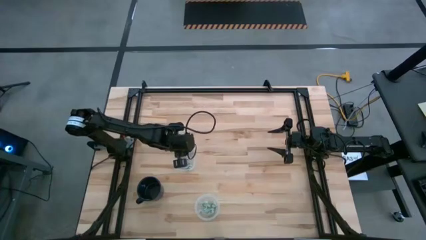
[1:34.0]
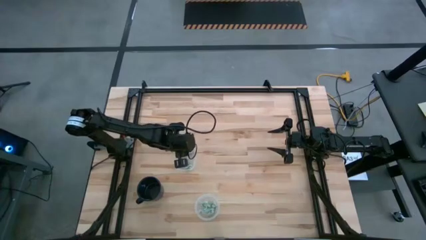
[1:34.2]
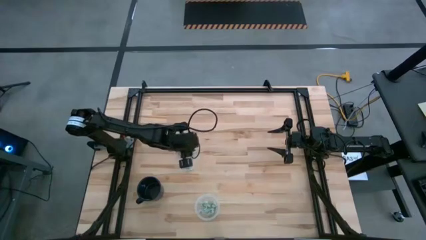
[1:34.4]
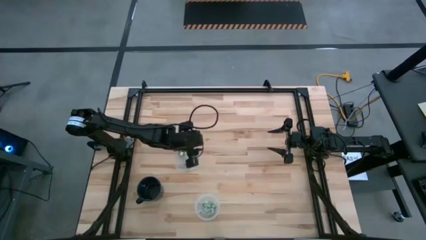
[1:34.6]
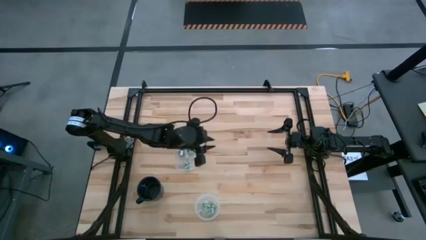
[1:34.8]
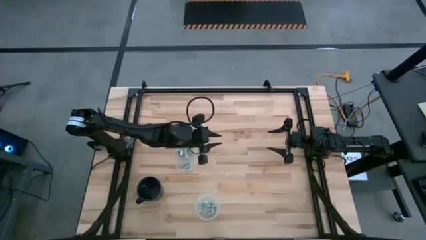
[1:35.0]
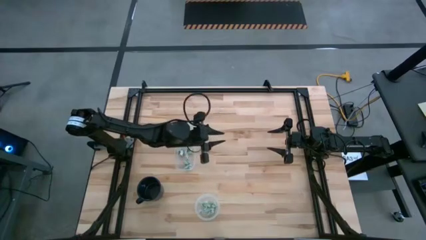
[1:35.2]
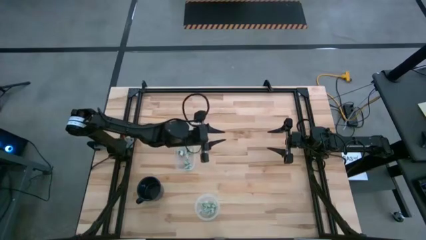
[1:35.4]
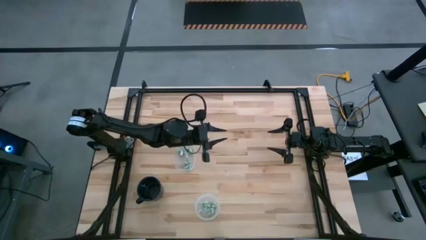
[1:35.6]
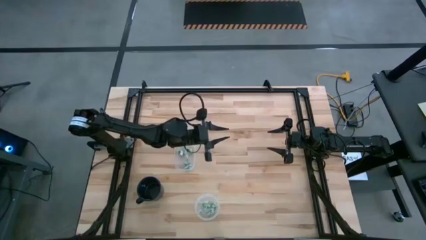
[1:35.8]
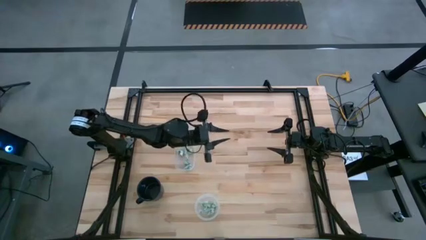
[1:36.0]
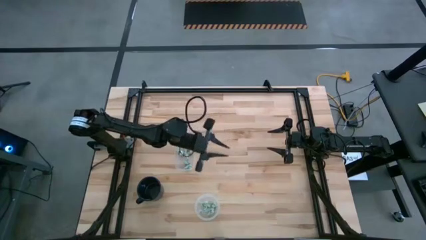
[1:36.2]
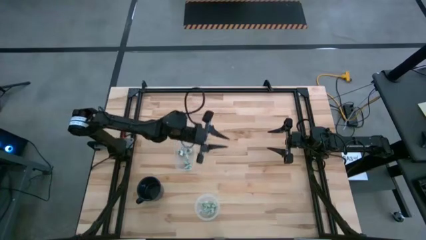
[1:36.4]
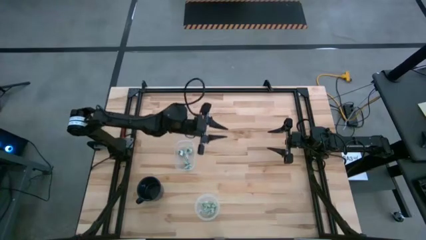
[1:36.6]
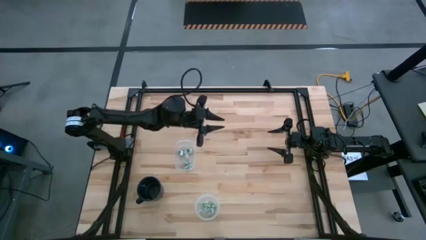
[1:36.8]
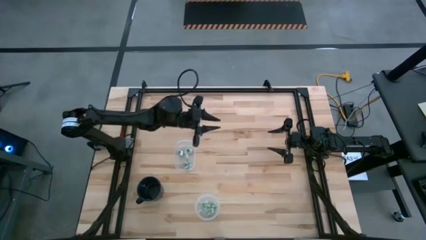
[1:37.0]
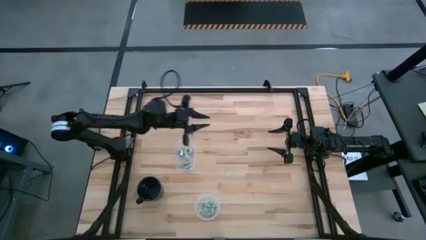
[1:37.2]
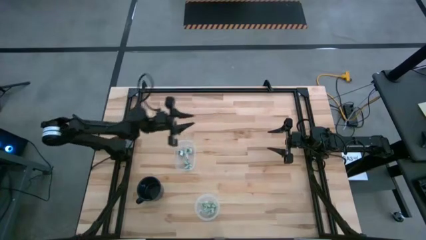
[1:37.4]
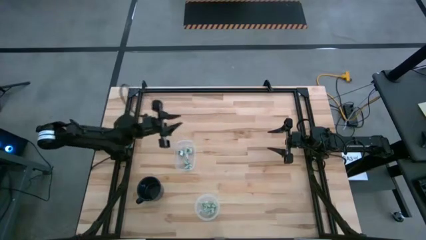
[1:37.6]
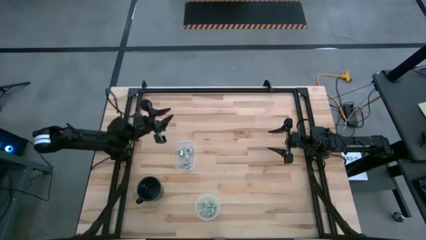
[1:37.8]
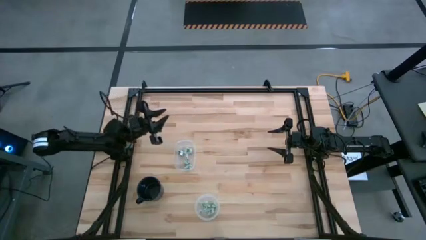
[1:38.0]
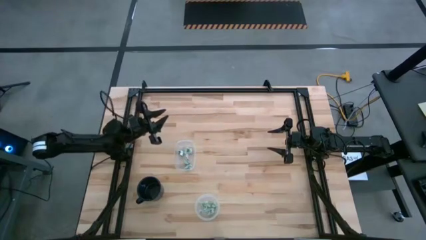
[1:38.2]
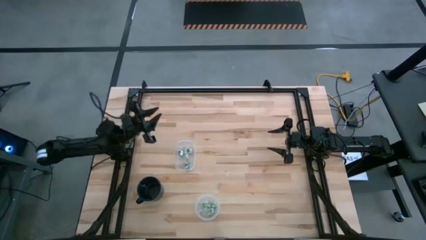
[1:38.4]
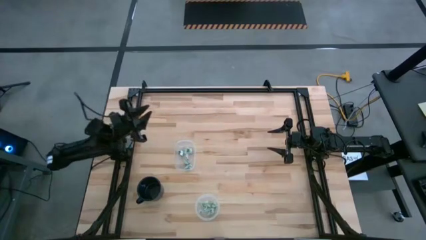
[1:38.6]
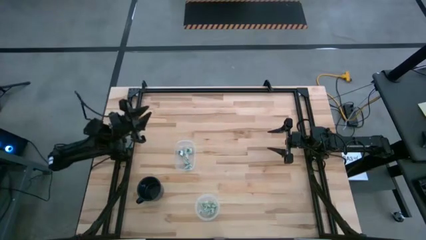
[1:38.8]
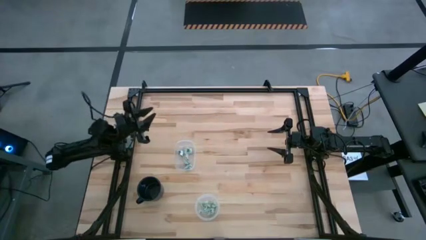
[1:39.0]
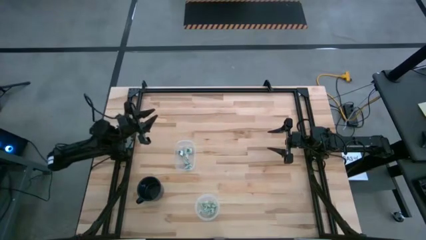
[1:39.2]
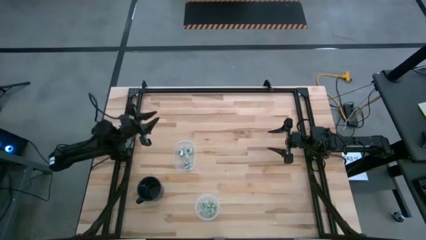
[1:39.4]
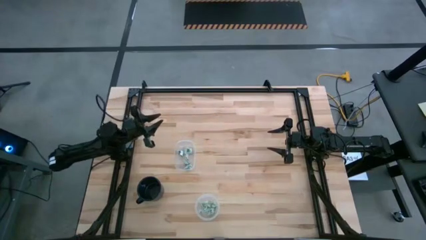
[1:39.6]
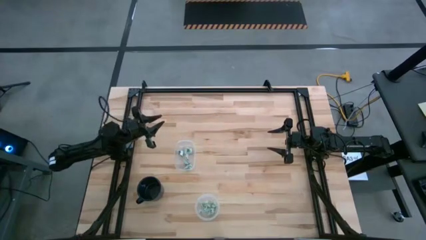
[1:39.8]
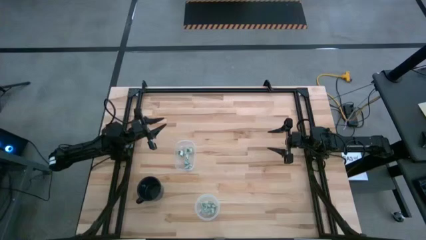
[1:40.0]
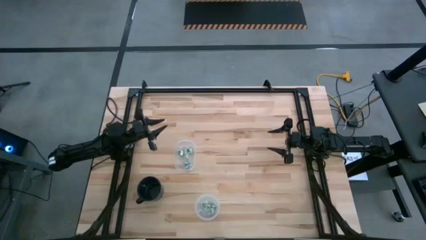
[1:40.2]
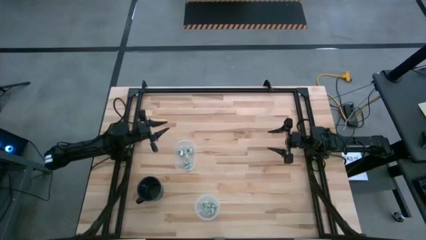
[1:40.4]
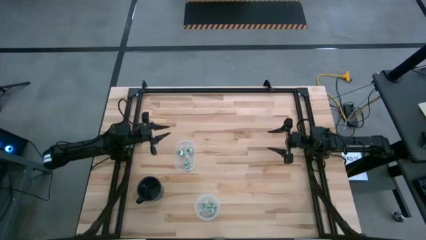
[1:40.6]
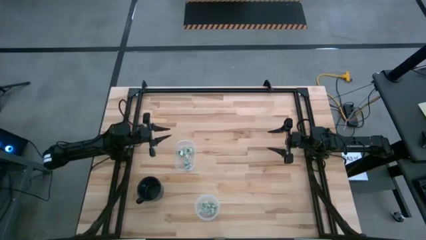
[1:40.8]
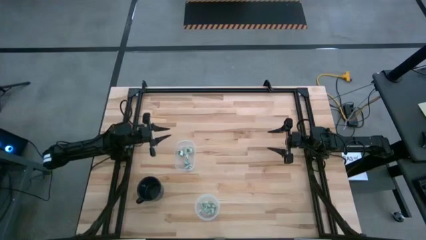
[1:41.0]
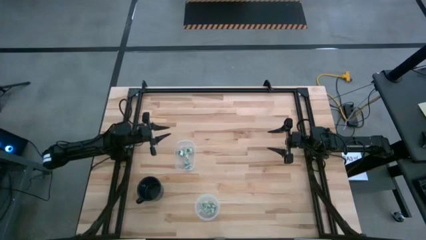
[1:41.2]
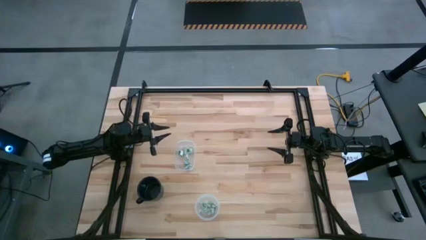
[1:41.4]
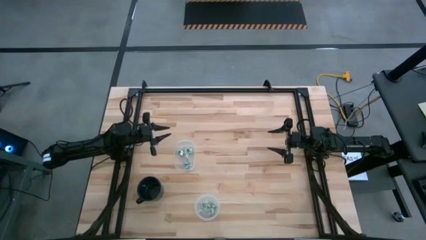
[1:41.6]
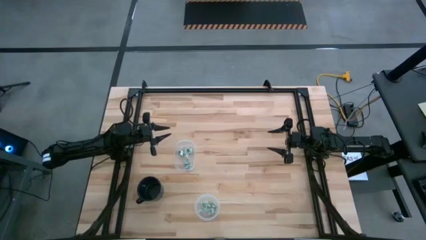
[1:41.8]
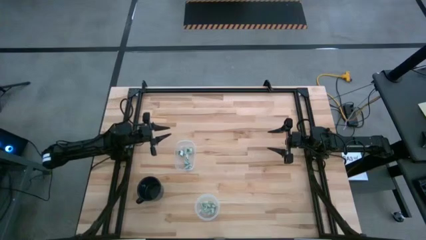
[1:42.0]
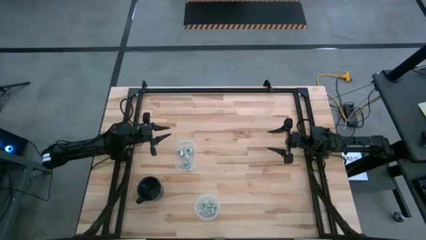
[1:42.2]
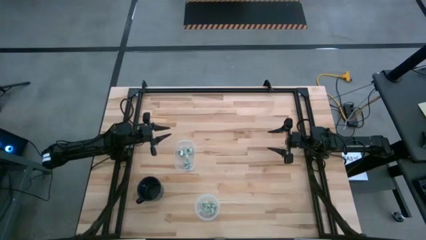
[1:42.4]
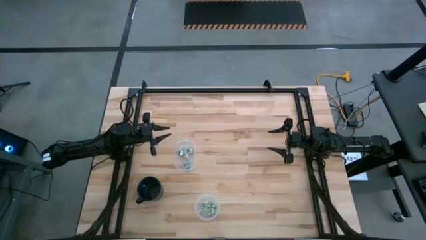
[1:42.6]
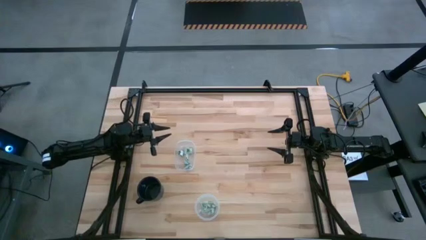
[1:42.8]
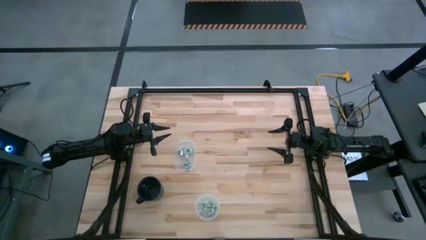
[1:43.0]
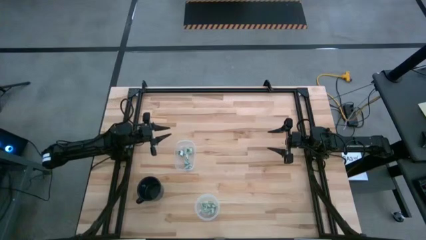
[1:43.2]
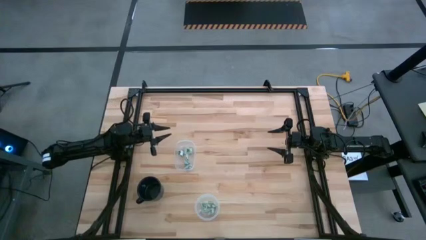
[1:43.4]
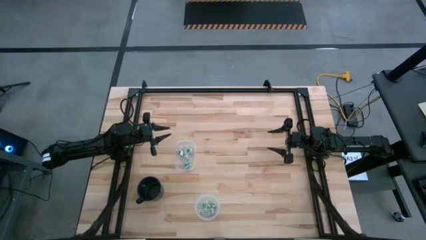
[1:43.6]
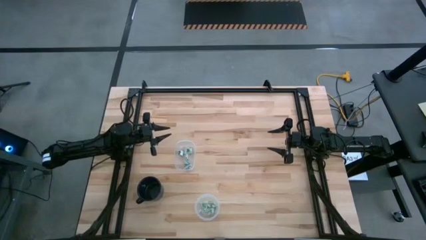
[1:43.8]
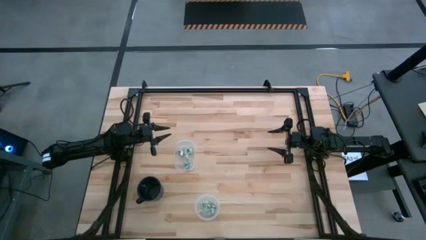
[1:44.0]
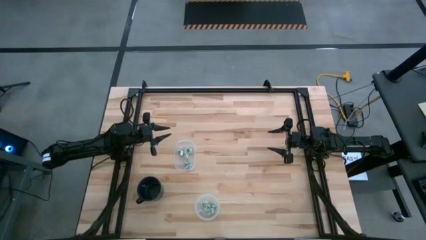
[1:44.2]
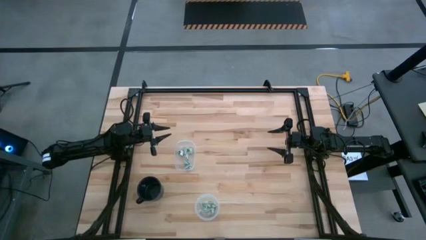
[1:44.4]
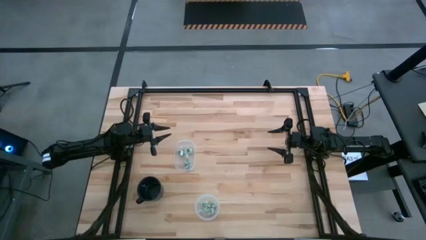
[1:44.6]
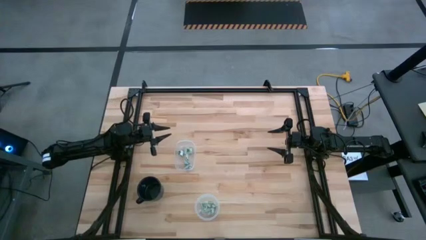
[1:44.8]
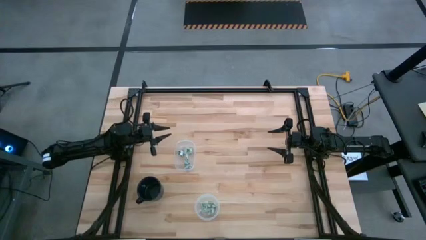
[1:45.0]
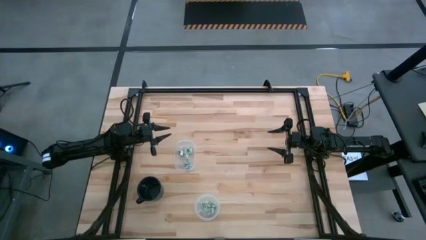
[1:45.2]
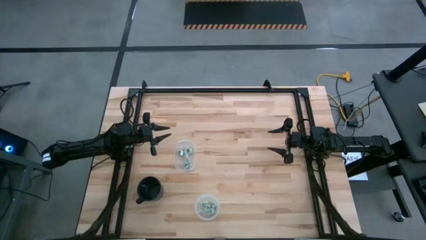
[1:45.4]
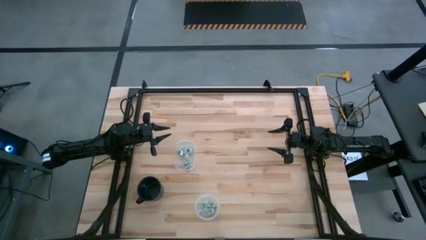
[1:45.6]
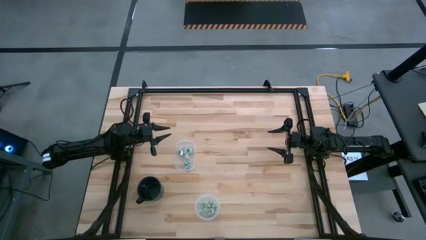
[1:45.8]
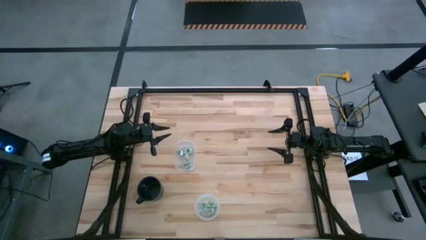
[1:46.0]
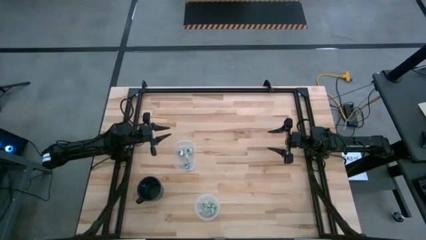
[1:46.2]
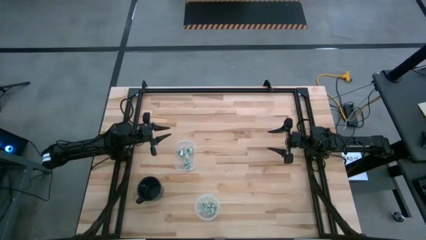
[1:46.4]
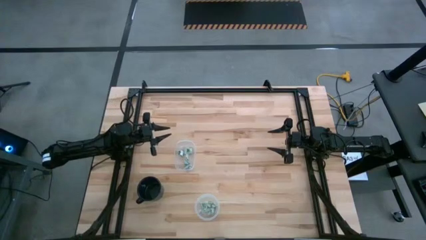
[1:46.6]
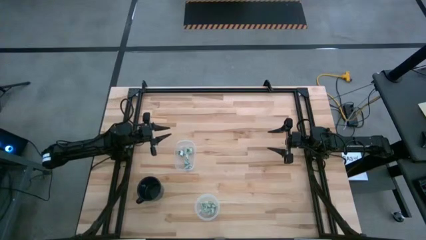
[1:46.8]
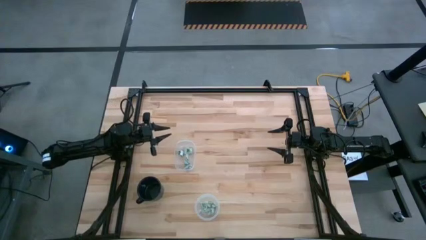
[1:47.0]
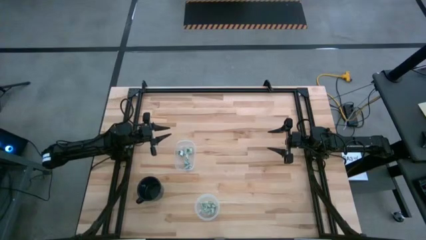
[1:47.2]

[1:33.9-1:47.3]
Task: Pick and place Stevia / Truvia into bins
Return to Home Position
